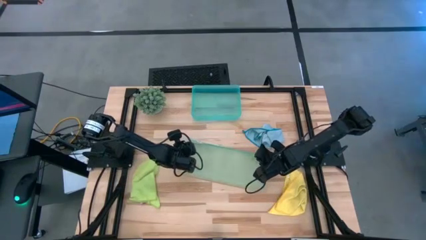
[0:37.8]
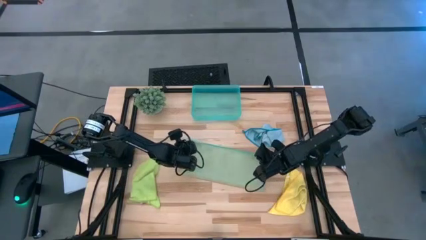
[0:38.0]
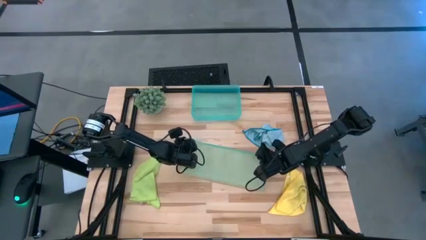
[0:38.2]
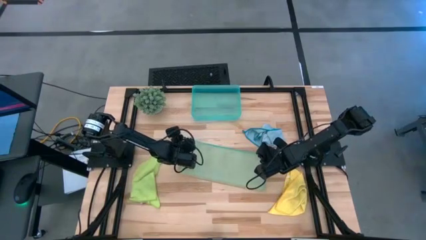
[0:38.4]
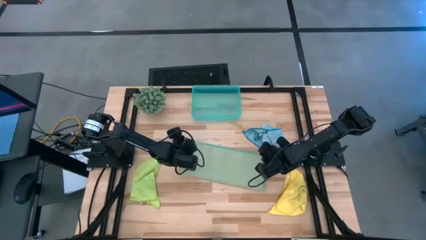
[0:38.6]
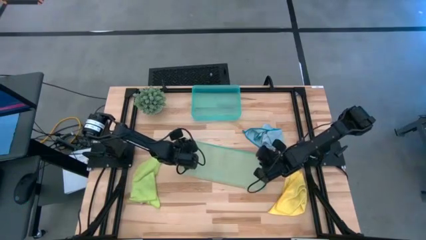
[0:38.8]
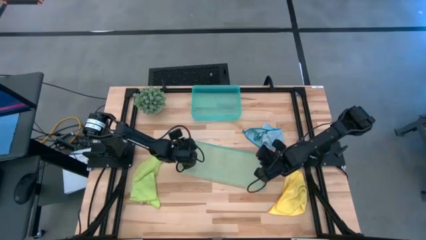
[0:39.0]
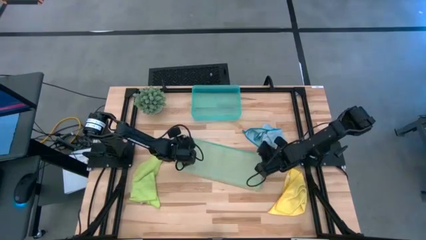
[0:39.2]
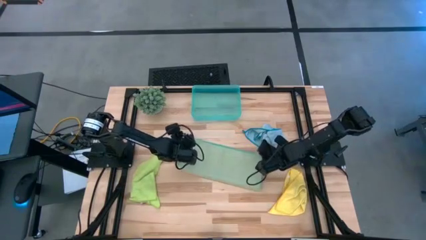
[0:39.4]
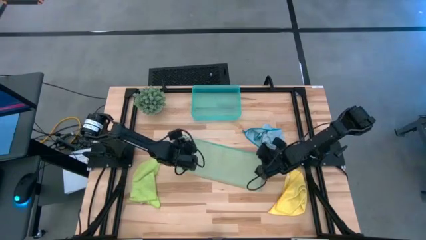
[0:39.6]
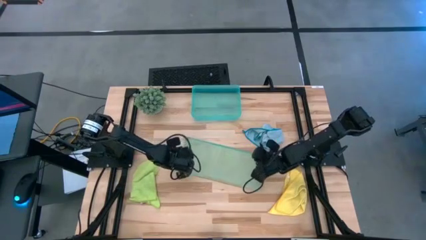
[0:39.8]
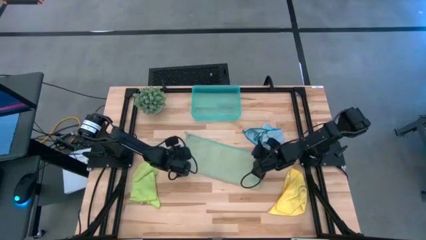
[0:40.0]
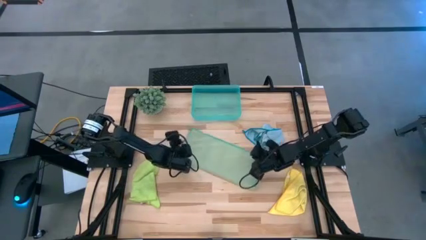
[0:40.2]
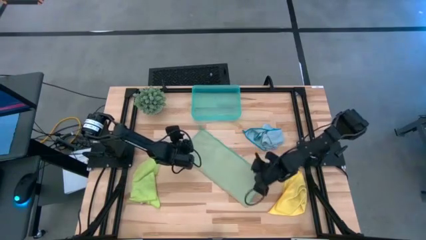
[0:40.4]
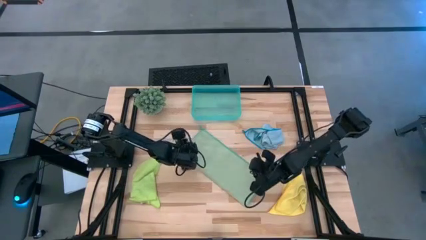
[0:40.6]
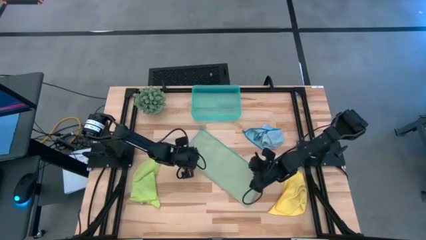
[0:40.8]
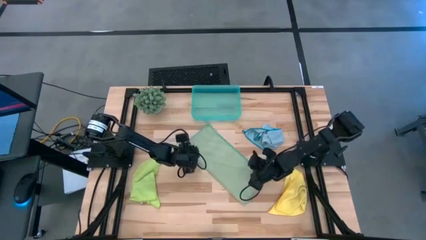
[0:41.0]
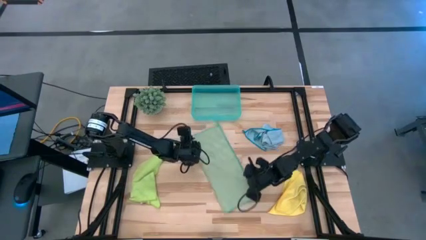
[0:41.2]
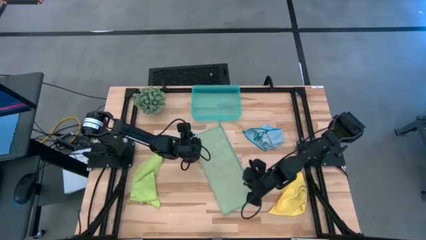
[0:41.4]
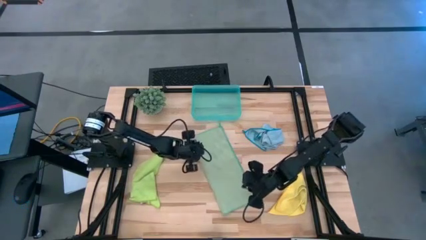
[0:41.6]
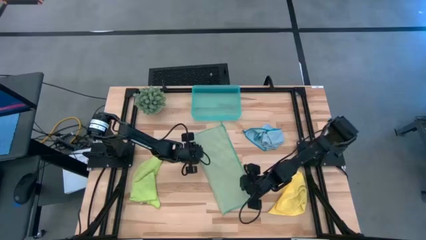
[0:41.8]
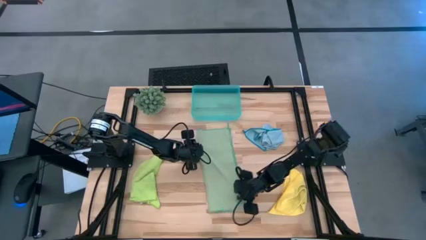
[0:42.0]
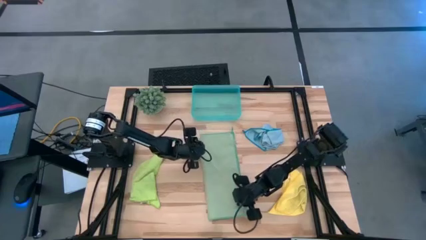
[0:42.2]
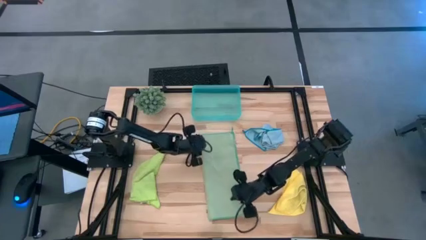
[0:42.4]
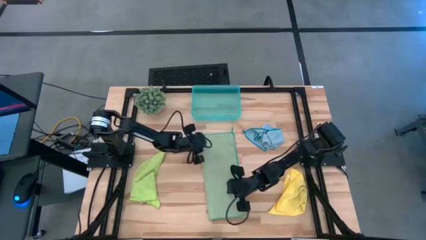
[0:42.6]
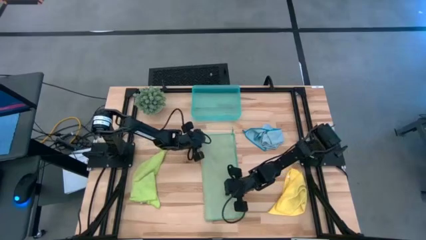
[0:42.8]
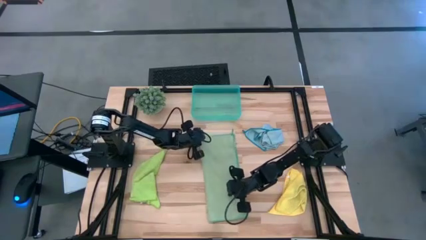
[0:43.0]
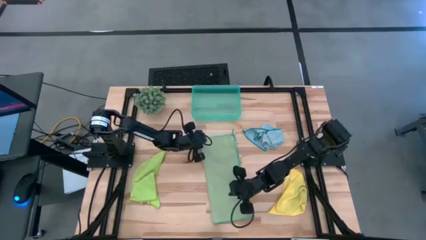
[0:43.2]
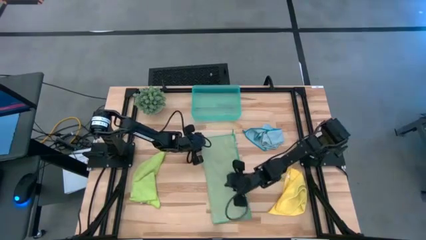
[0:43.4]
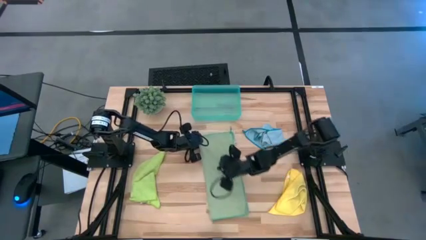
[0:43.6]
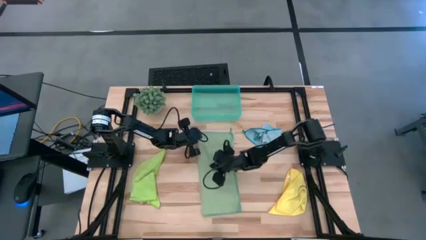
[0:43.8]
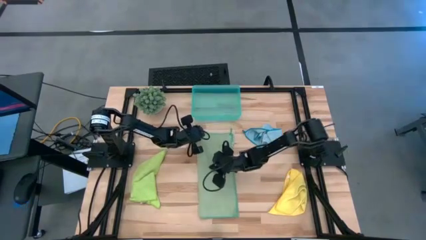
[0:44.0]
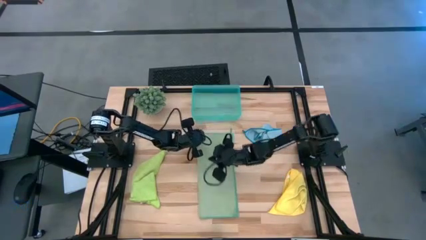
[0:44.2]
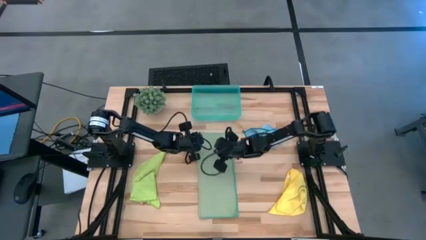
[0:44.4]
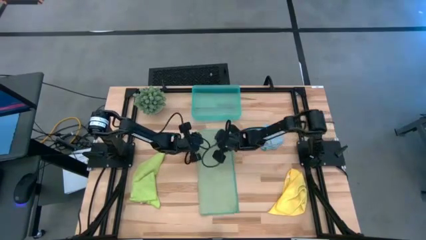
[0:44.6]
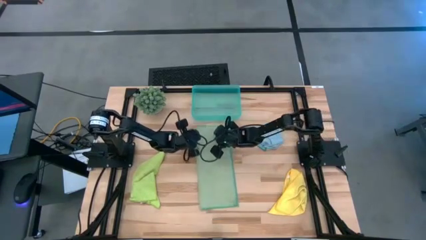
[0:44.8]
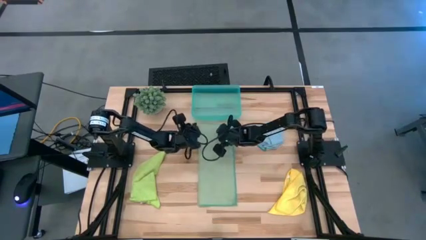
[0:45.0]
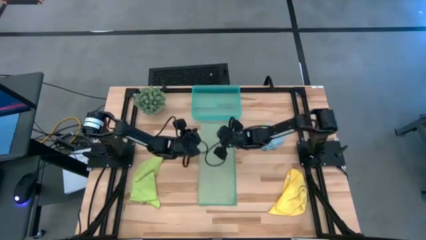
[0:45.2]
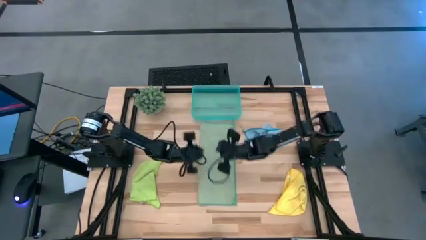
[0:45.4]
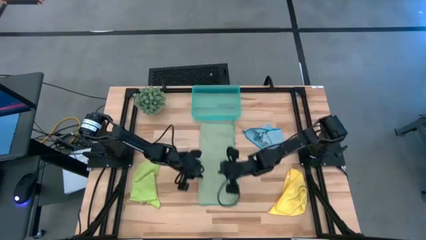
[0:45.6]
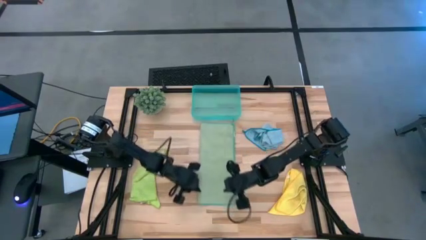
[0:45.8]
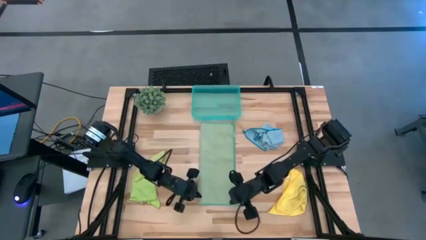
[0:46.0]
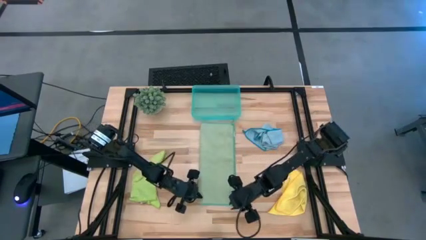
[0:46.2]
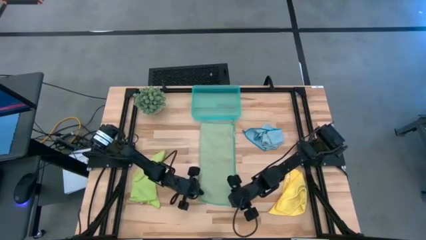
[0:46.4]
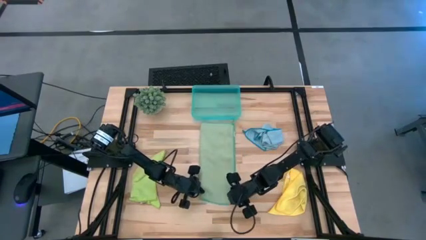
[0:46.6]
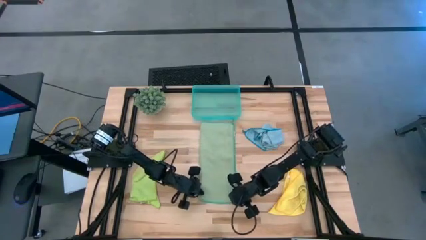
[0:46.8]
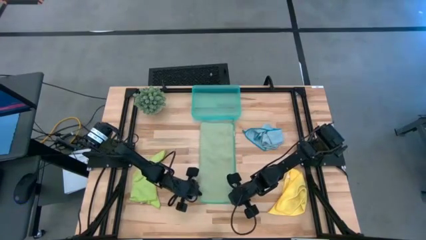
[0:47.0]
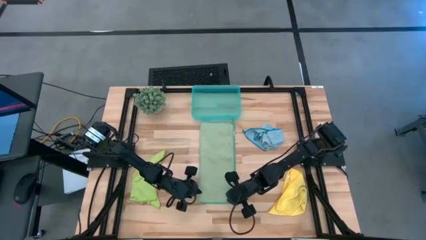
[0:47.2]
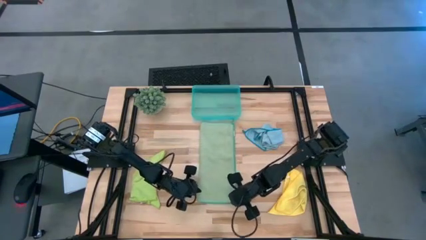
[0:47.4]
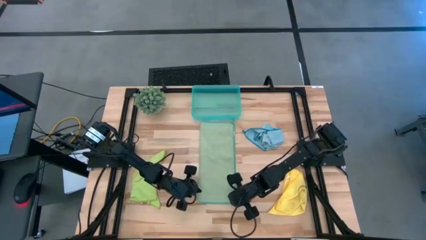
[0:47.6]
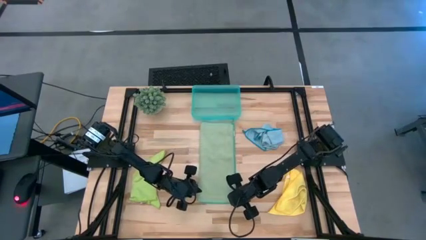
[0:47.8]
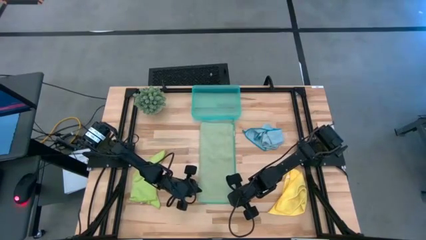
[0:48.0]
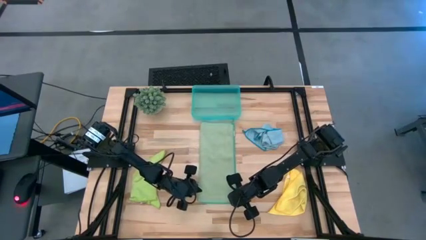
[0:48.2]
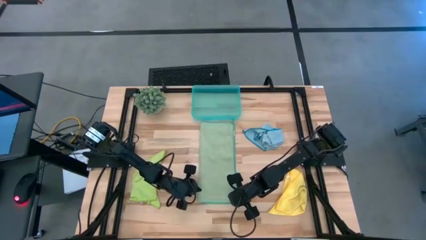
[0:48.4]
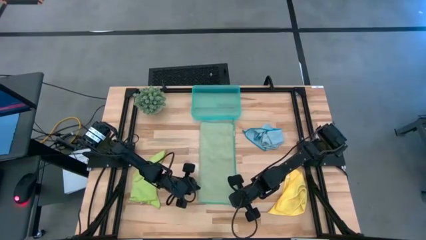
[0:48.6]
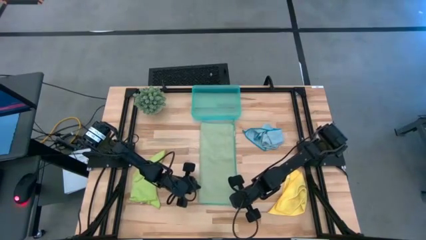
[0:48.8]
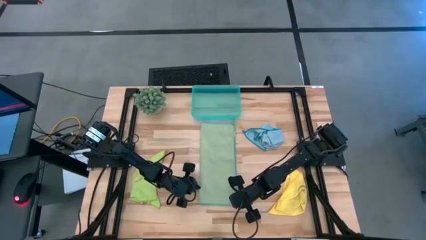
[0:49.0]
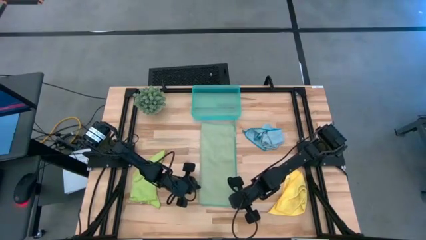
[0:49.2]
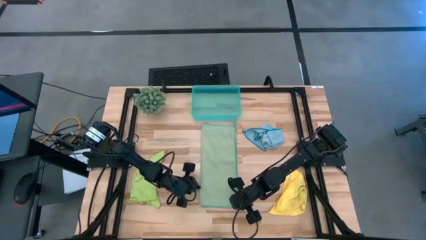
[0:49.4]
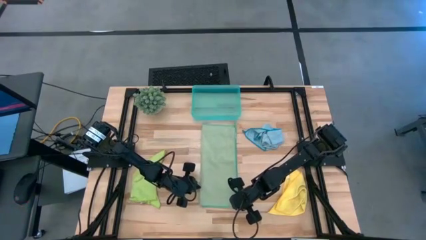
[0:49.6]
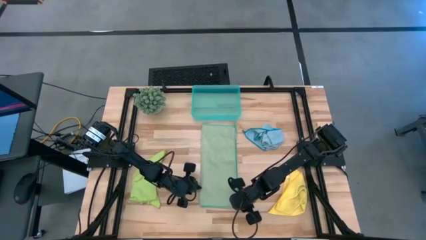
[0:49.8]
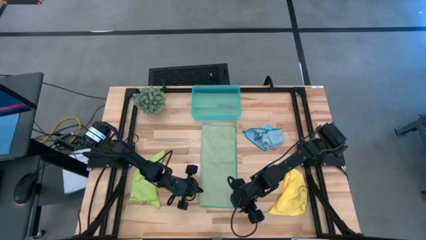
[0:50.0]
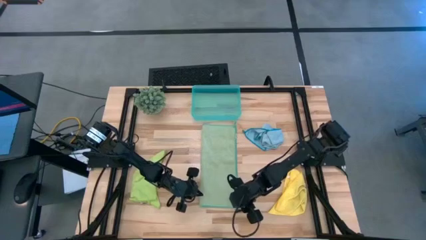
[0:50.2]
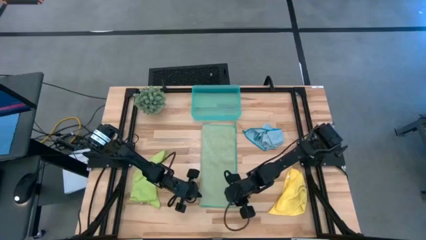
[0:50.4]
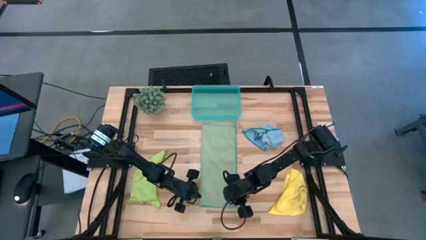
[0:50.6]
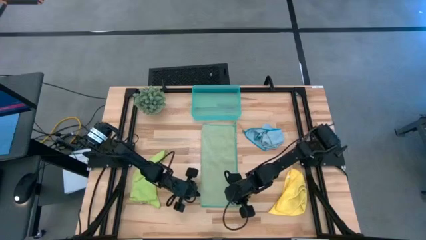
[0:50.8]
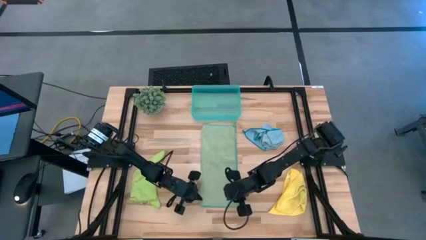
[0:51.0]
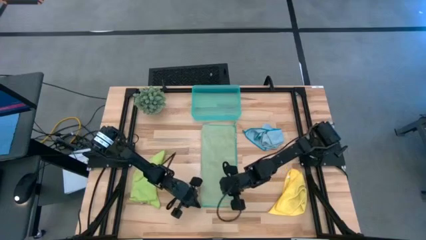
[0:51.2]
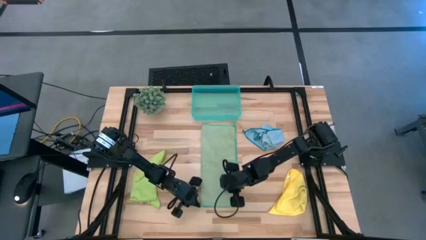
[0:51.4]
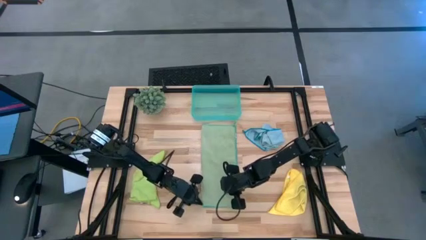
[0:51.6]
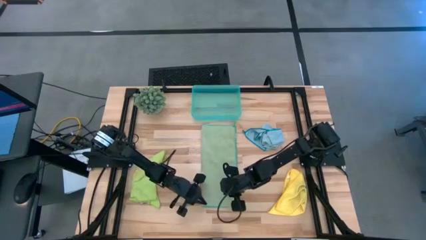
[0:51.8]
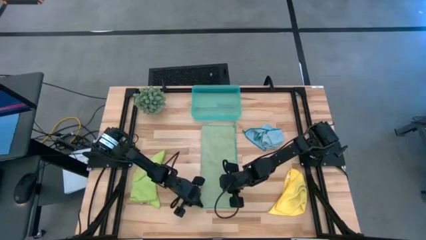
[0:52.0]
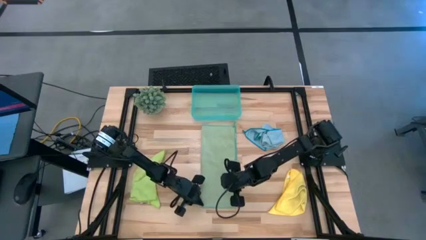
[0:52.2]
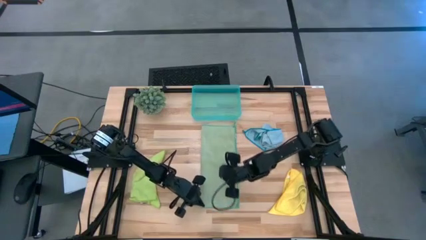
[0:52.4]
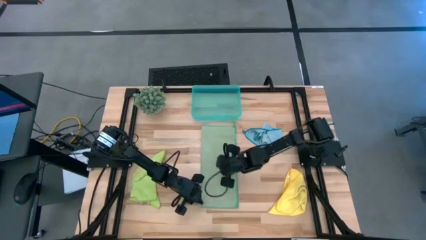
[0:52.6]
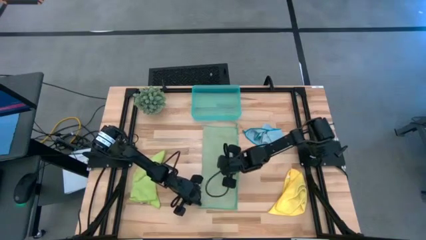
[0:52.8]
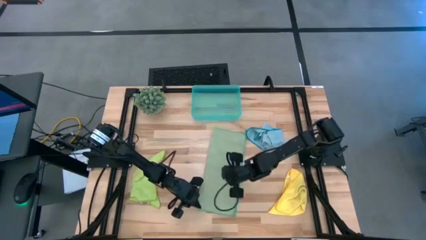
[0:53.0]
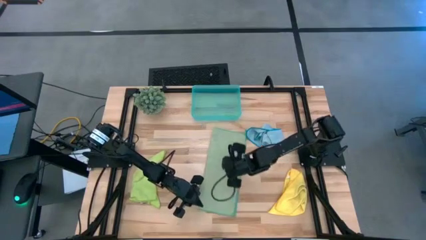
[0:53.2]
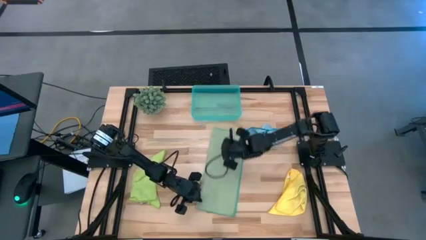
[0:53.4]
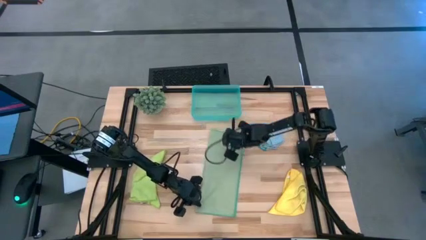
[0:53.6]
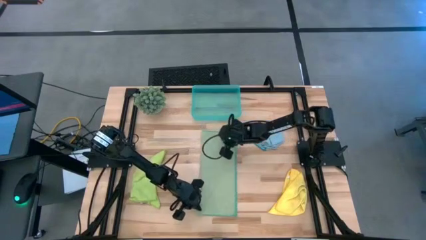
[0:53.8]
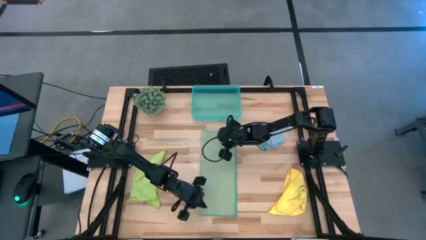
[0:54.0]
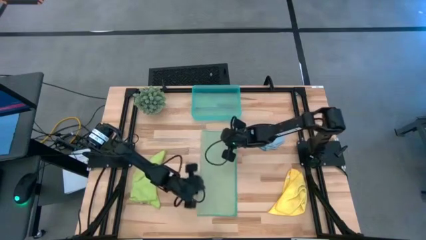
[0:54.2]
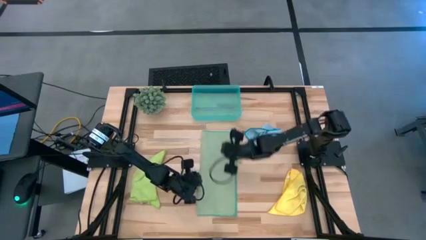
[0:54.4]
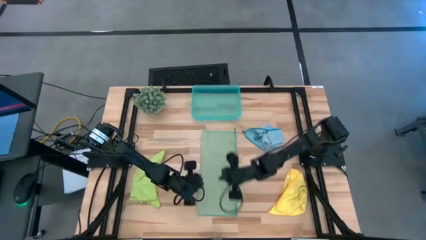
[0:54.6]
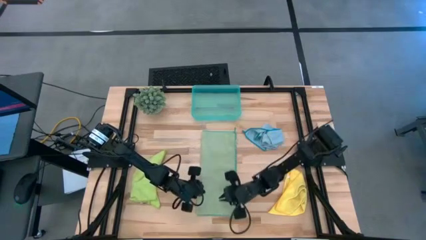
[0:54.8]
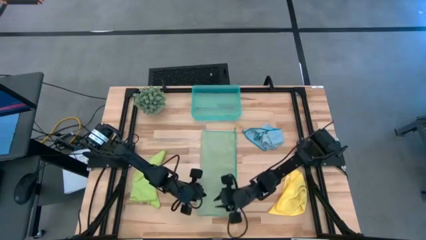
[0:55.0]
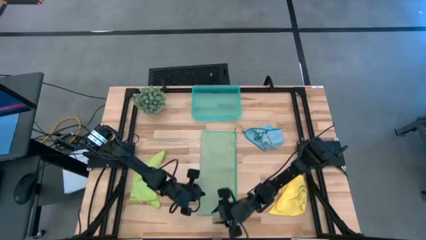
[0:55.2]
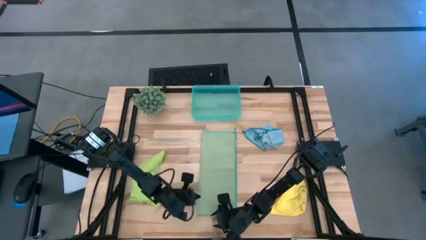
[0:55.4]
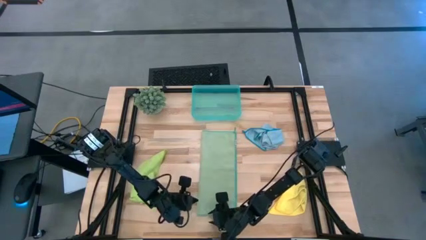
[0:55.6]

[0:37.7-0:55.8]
Task: Fold microfiber towels
Fold the green towel
